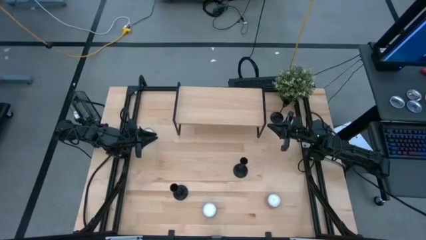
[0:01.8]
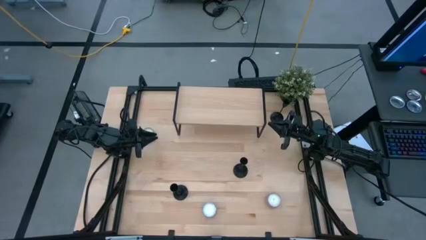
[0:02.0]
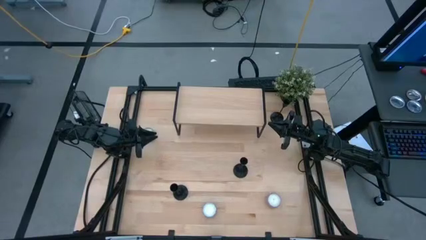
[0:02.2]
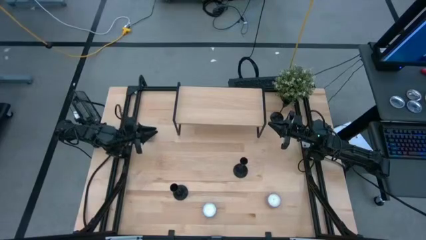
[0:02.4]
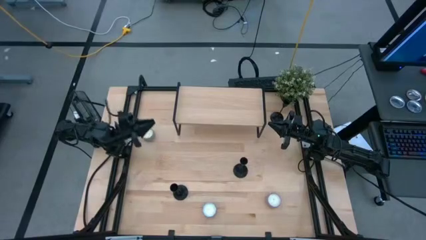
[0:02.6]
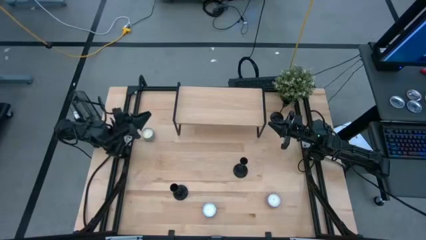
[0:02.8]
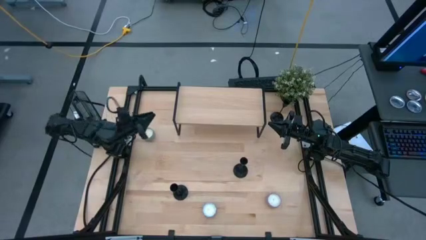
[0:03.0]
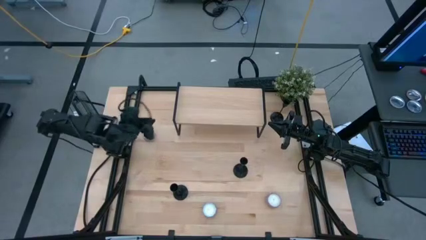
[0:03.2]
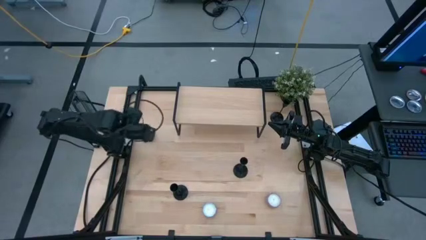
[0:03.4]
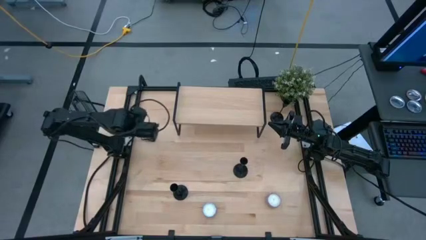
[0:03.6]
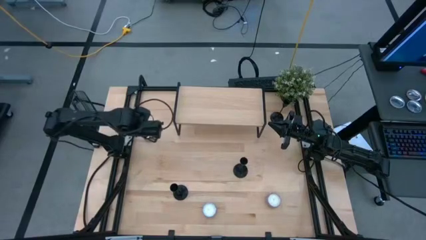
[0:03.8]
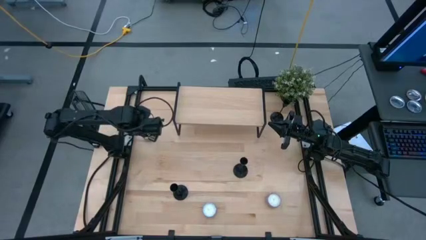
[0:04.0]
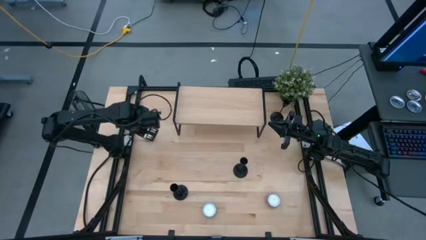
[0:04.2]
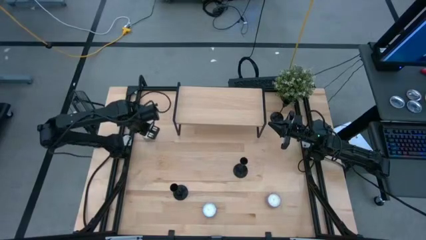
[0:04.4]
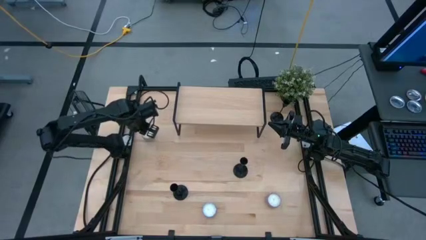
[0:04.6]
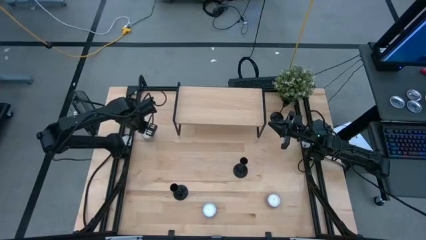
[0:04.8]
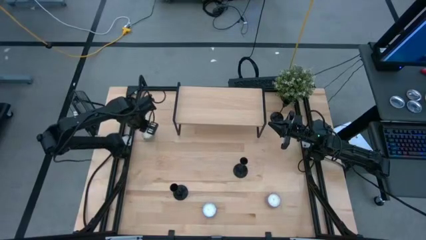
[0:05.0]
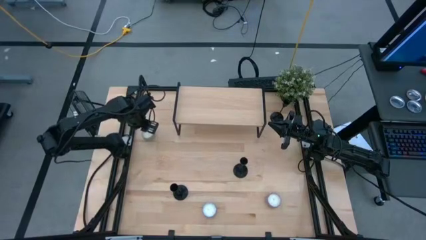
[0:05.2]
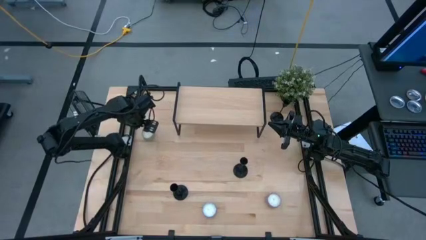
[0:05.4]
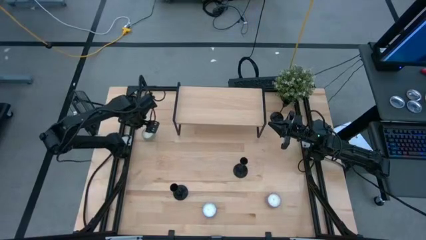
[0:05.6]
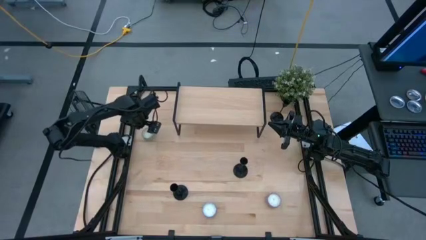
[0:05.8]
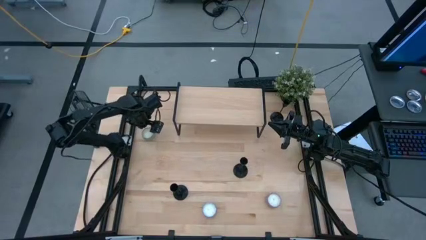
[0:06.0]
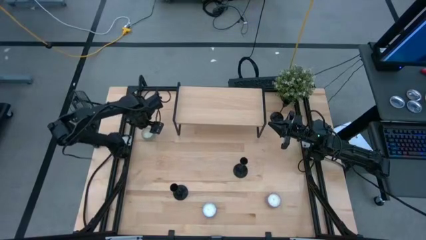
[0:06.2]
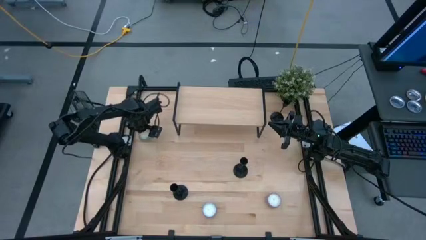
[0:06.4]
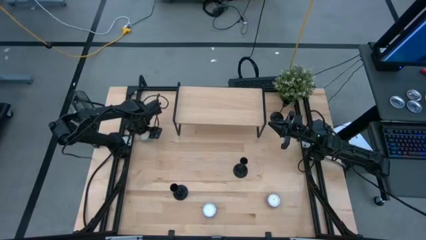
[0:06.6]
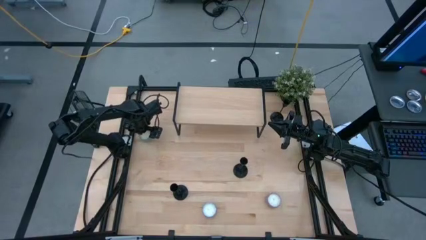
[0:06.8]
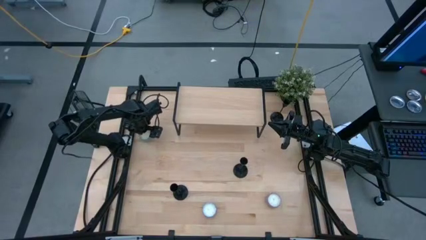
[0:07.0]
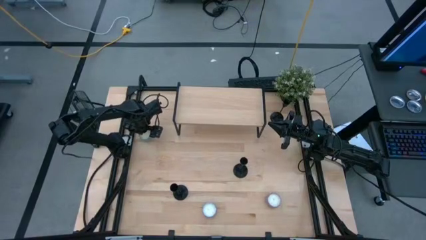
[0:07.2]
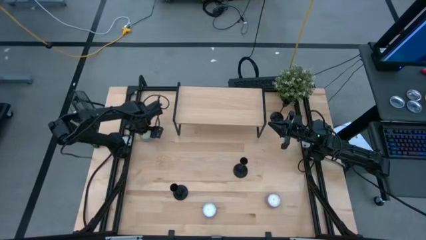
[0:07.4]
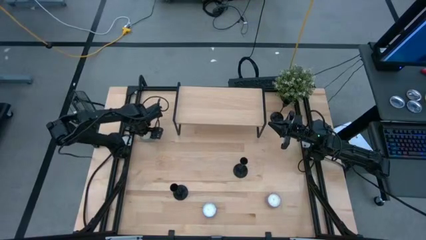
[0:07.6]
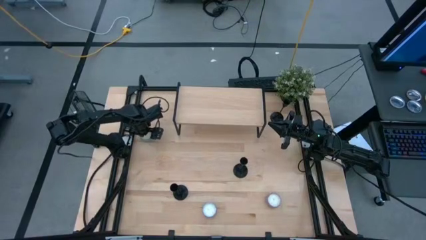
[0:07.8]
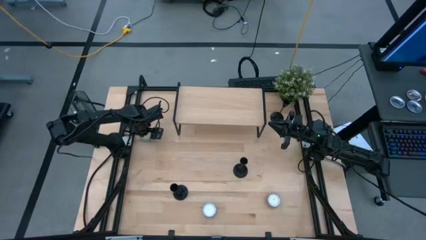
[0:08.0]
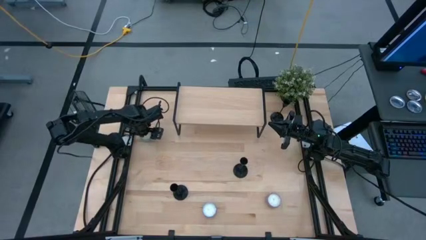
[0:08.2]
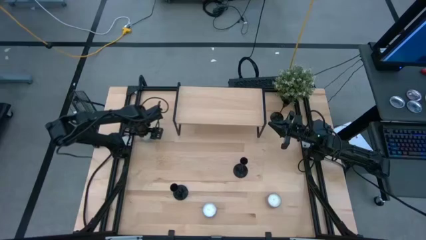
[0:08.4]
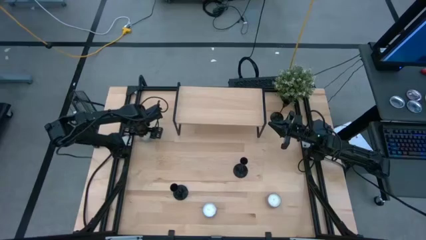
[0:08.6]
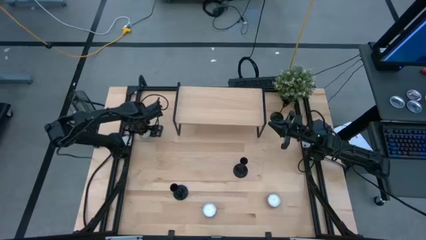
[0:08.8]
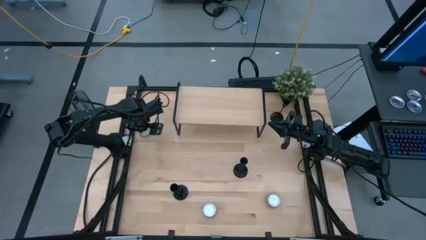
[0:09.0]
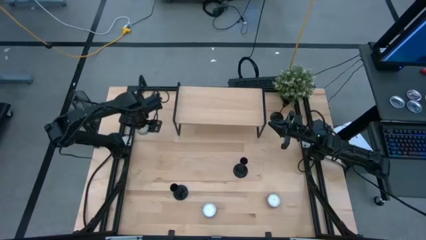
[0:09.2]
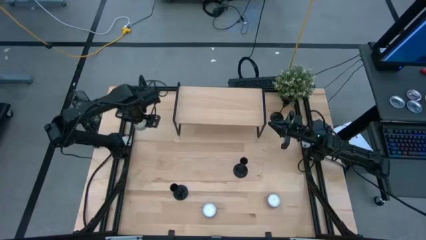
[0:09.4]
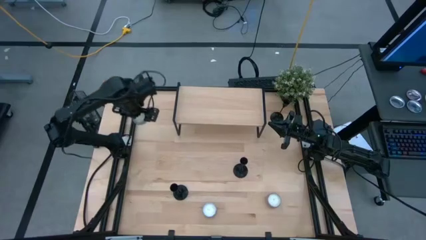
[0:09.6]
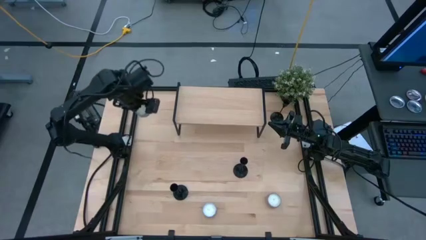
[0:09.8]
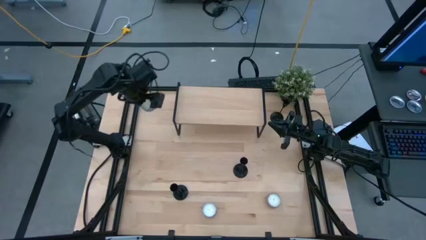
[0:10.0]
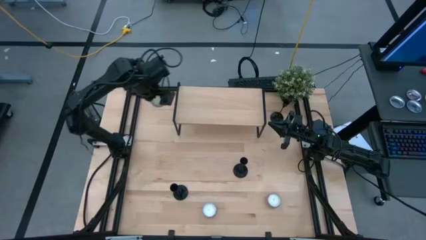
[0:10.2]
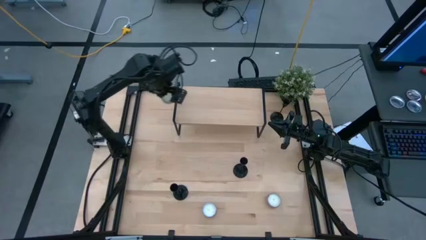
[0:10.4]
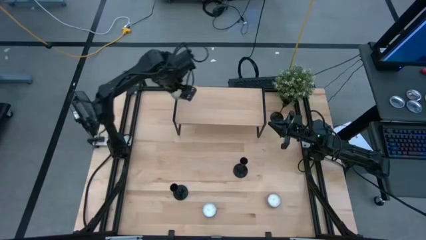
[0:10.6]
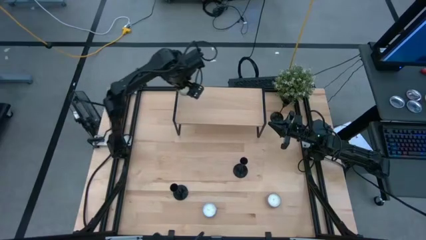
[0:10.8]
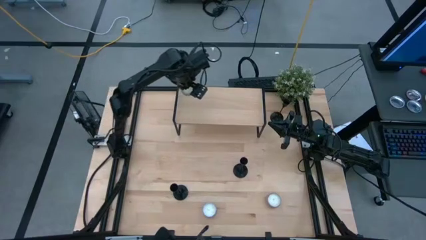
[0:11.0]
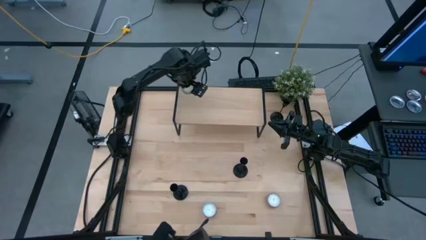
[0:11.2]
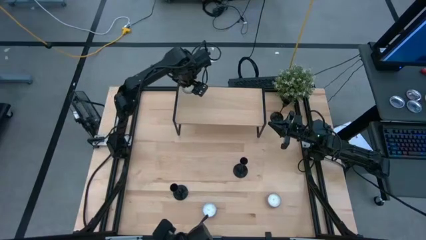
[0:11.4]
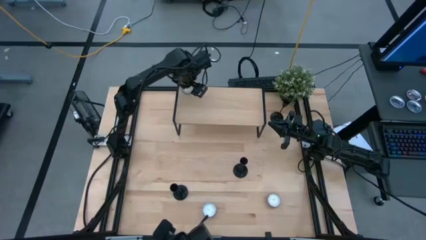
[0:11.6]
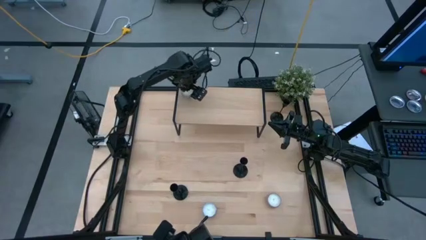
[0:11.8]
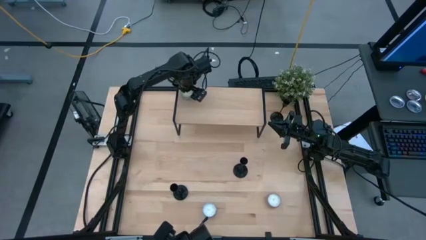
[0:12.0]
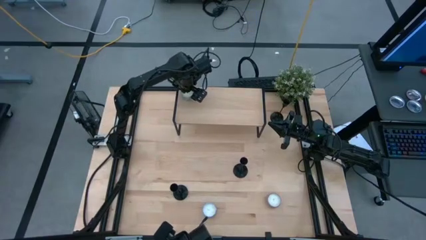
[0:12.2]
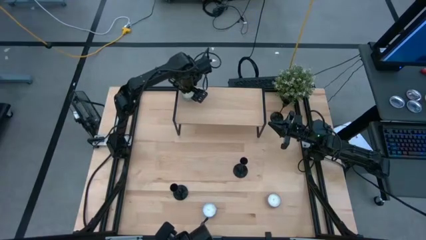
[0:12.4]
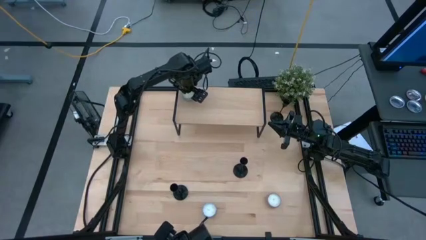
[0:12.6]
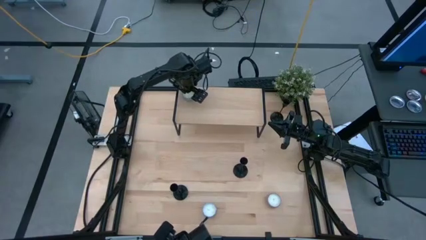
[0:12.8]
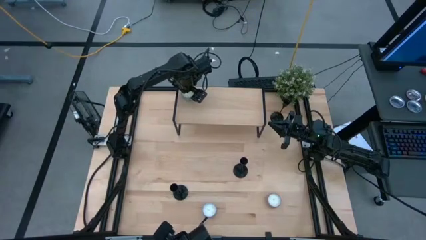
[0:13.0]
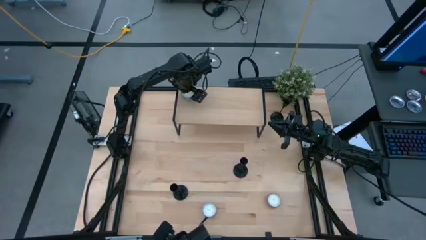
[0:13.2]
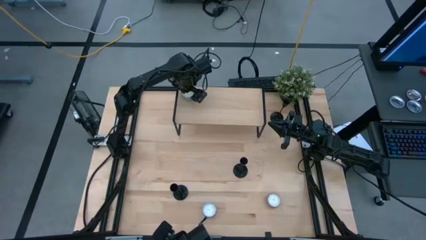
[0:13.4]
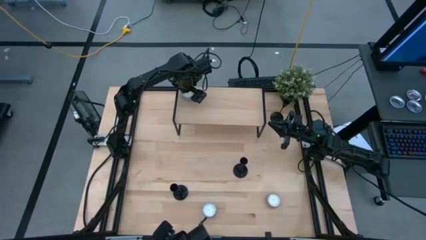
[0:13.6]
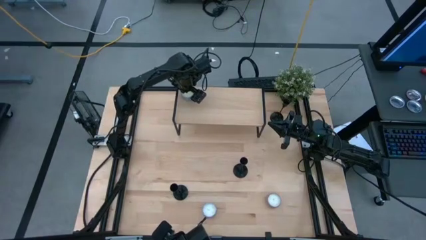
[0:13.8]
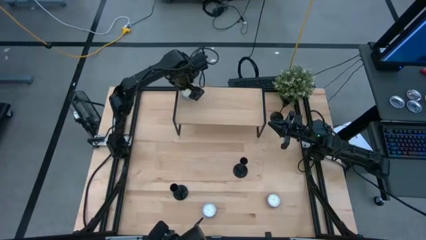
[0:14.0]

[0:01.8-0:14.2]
Task: Pick & Place candle stick holders
Put the blue scented candle on the shelf
